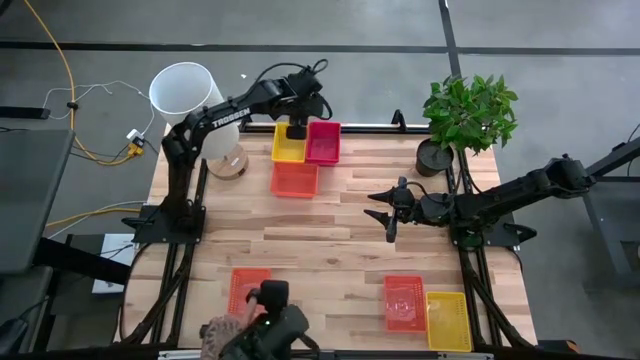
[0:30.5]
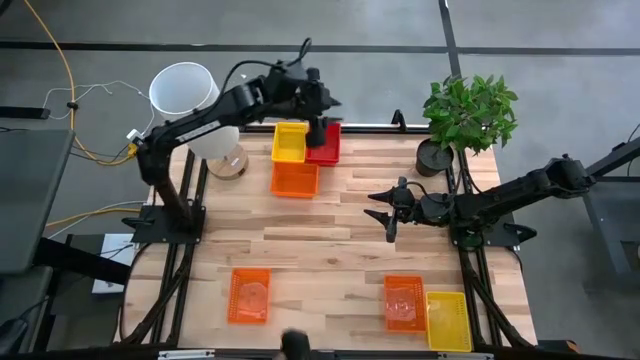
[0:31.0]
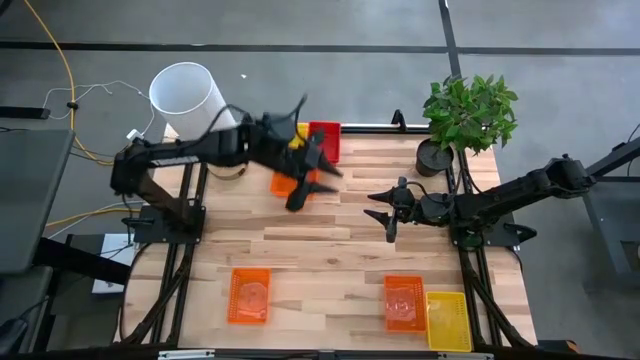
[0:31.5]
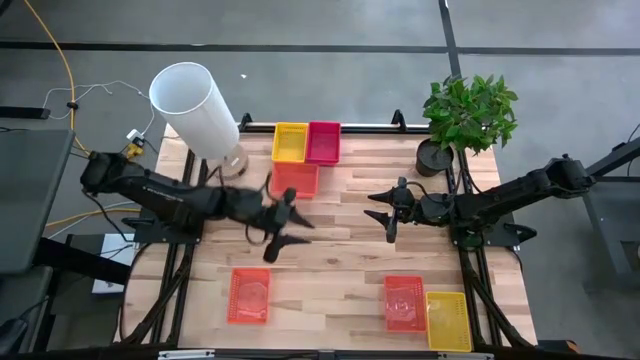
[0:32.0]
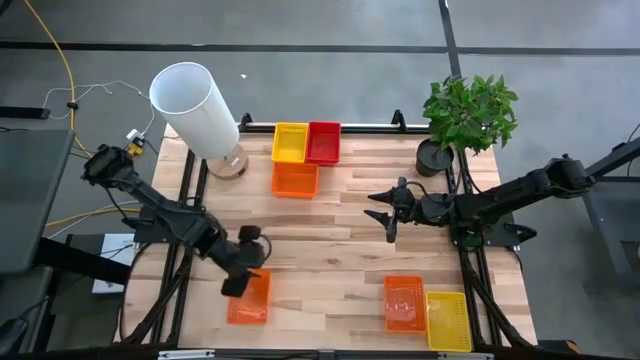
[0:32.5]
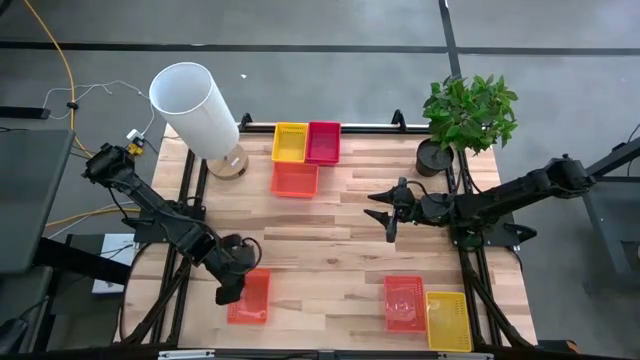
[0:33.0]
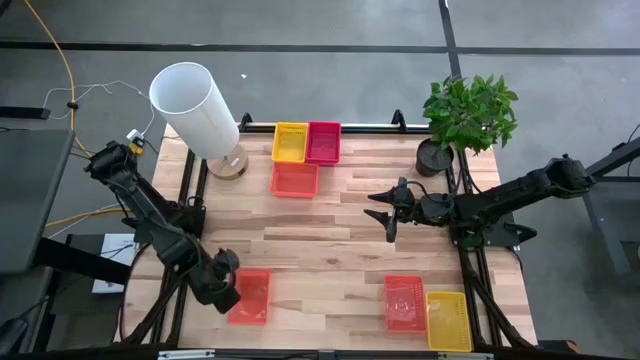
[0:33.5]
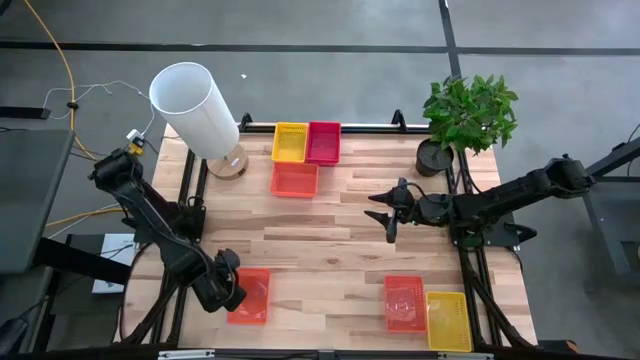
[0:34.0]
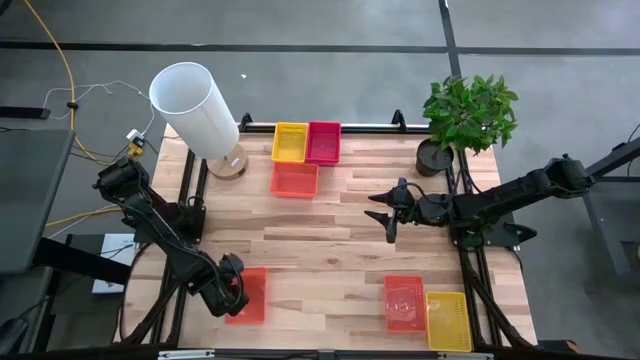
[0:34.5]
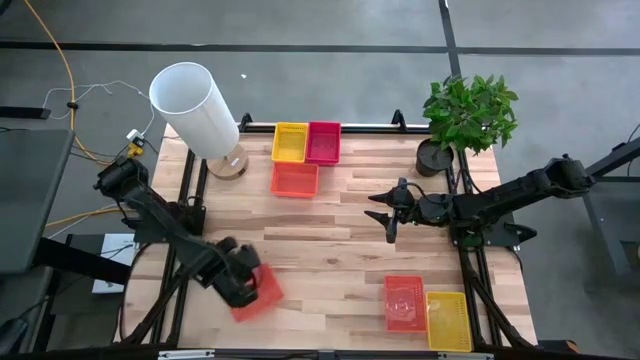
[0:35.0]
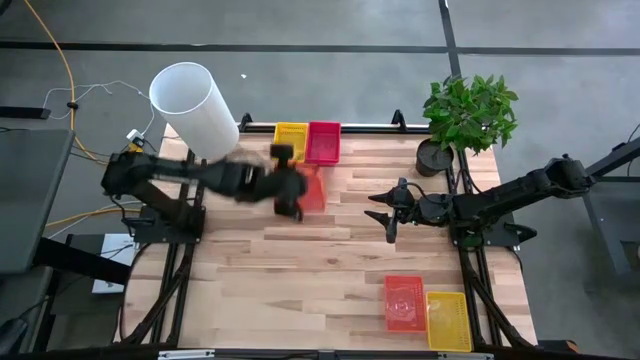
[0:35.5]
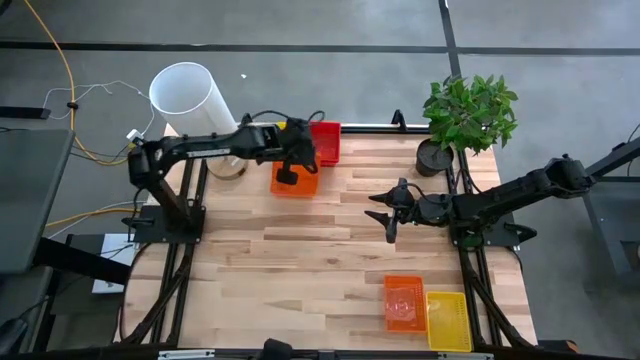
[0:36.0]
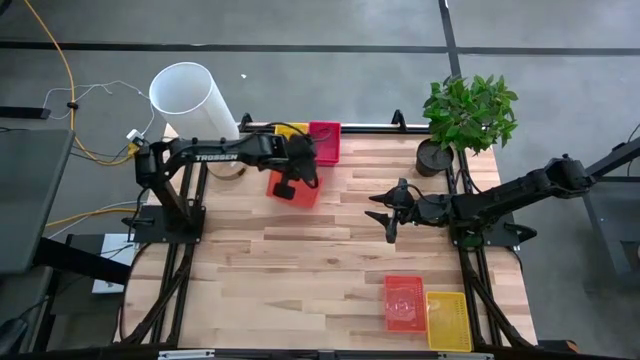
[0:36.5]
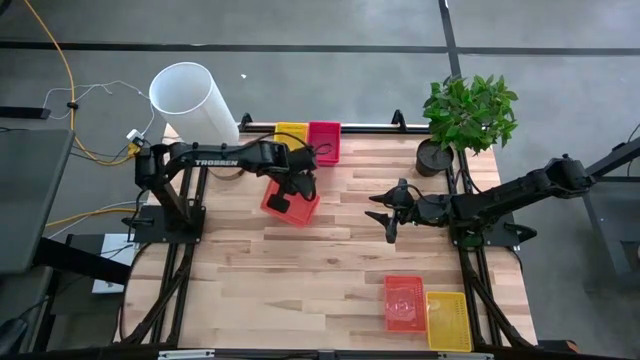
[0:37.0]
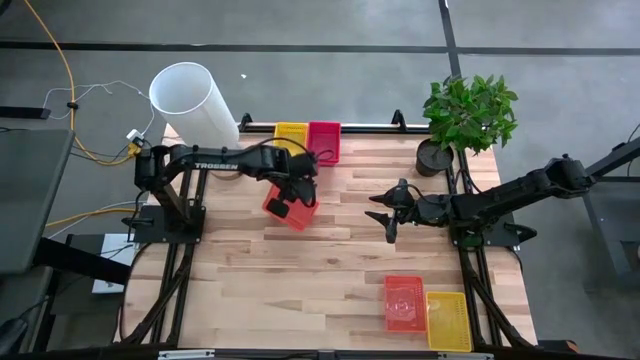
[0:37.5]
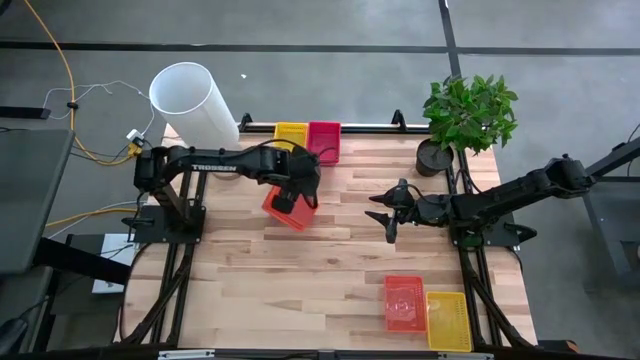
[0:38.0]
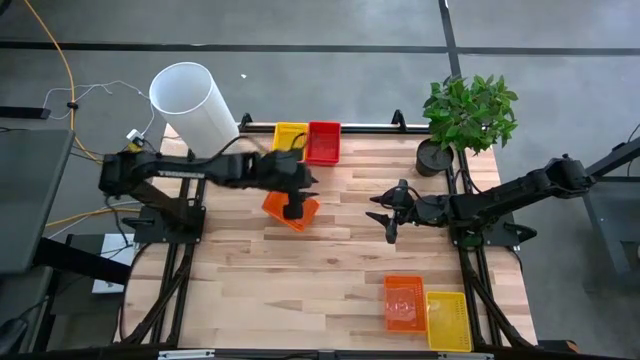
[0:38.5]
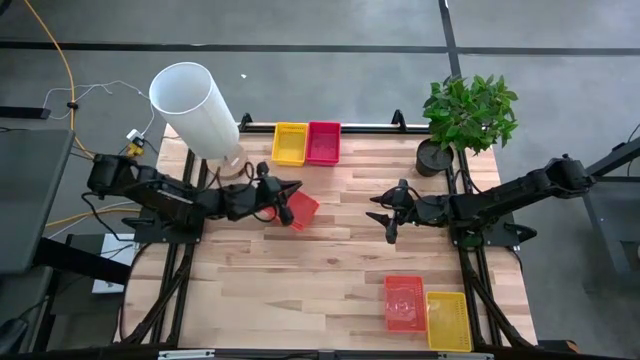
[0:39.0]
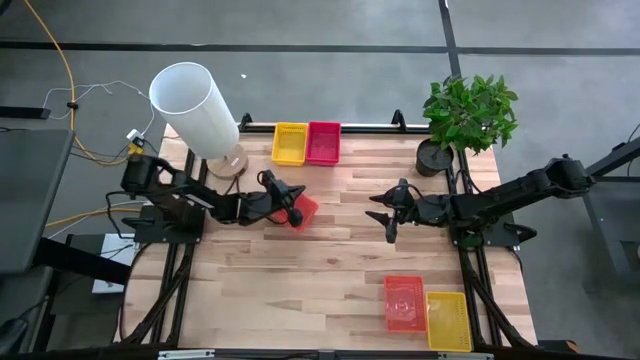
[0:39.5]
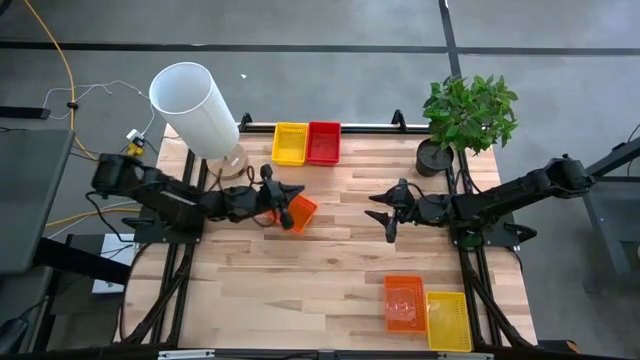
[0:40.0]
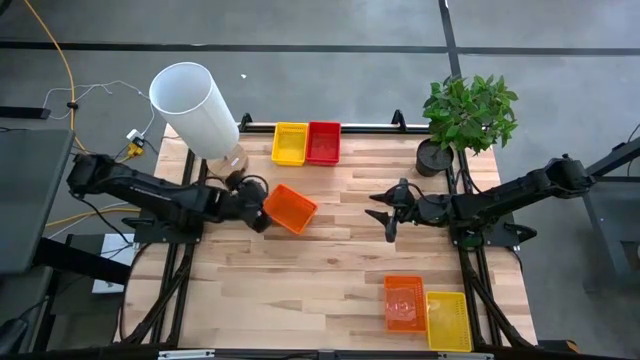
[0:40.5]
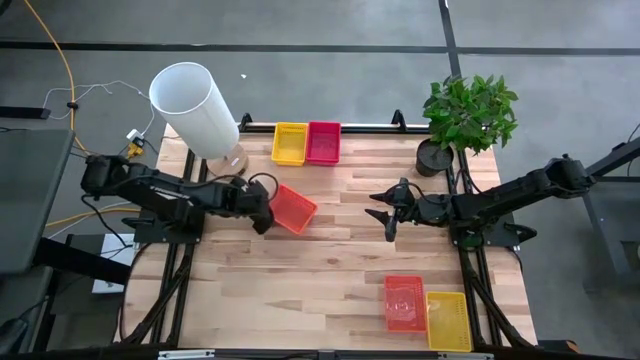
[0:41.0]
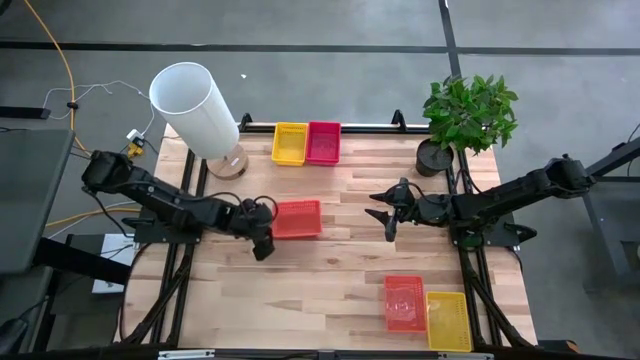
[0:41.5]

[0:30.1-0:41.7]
Stack the bottom left orange bin on top of the top orange bin

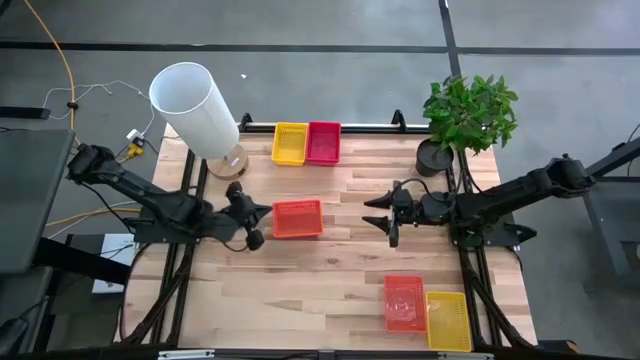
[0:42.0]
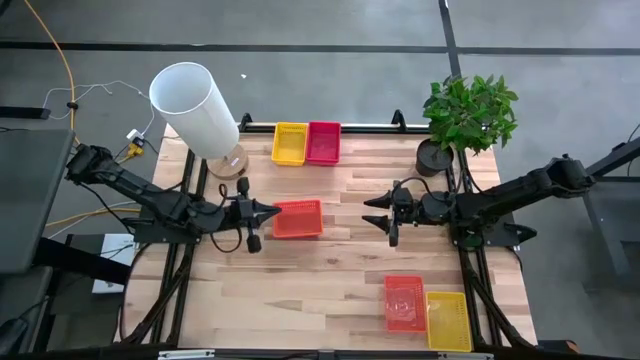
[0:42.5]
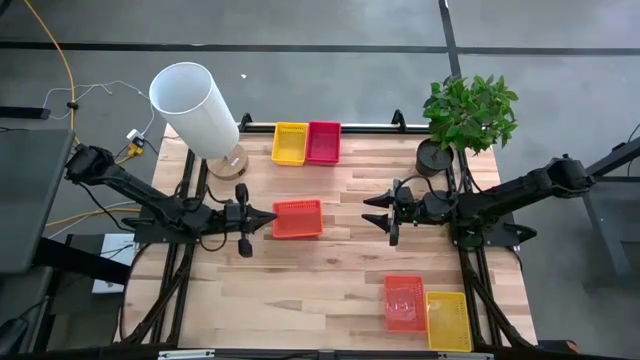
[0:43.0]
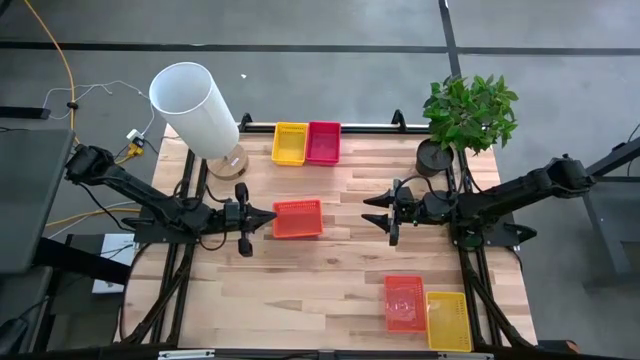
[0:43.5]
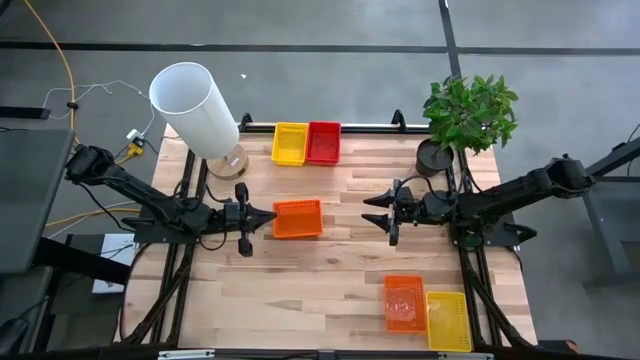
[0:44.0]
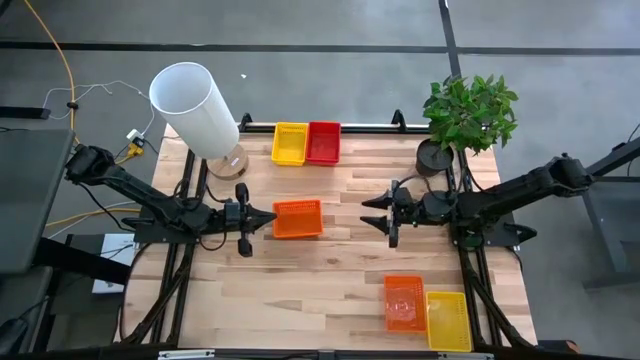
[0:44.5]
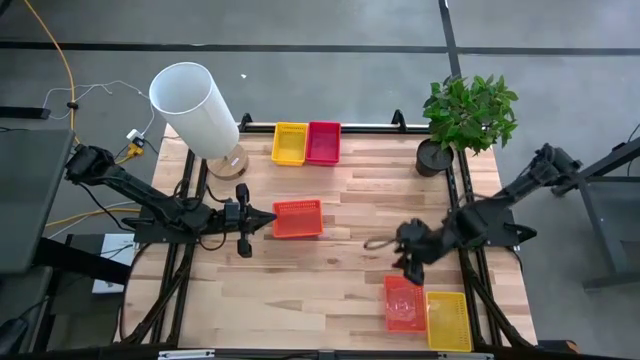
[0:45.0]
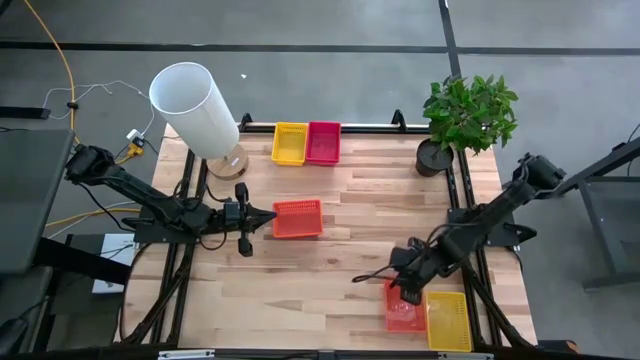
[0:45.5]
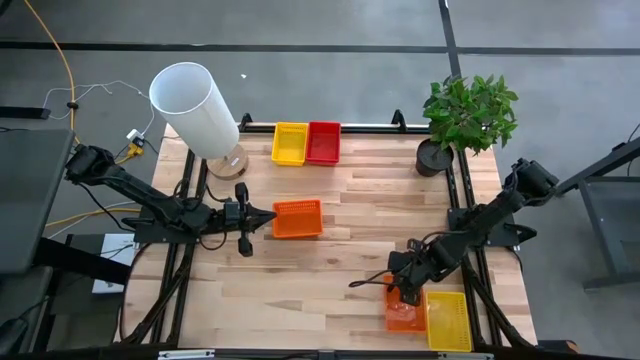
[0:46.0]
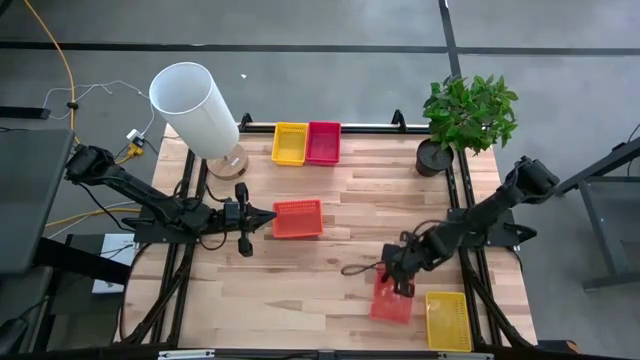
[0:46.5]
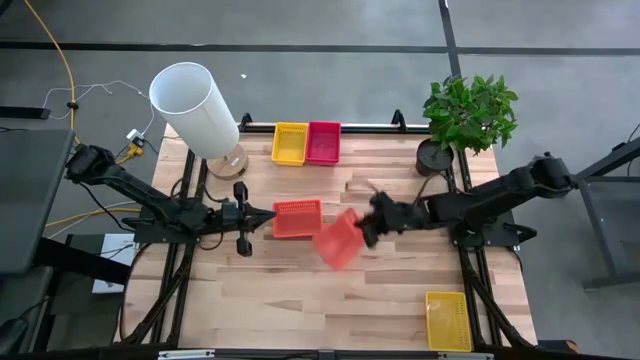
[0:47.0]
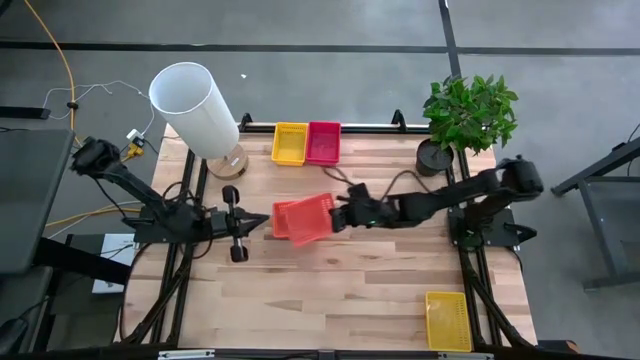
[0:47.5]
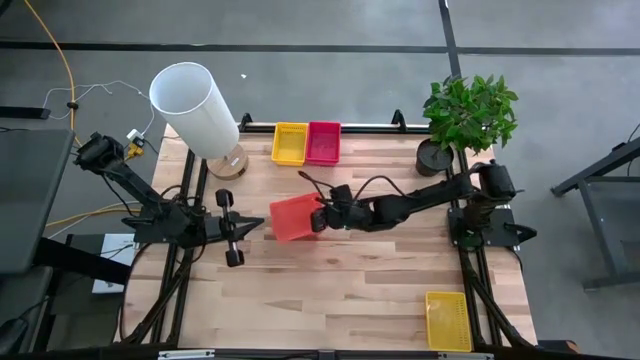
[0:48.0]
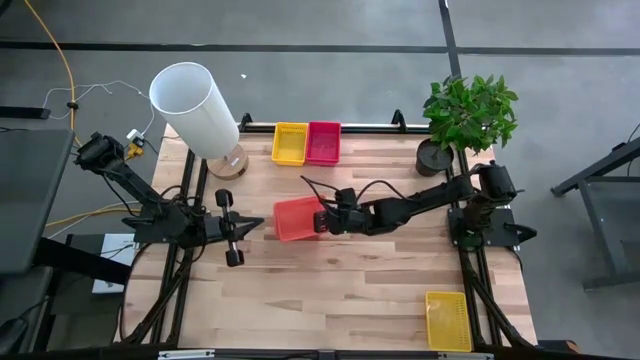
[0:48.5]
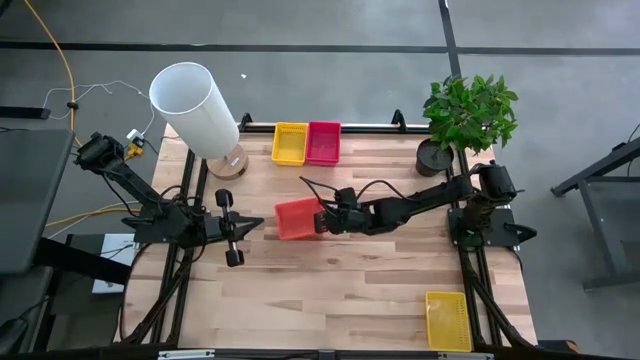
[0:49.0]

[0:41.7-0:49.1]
Stack the bottom orange bin on top of the top orange bin
